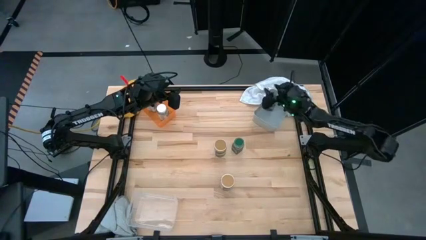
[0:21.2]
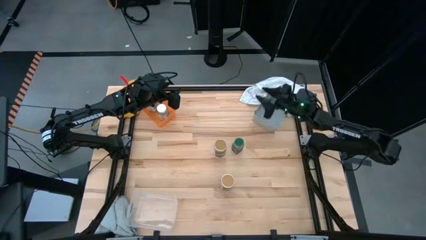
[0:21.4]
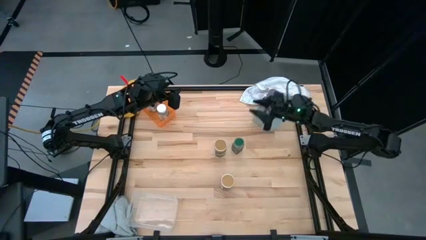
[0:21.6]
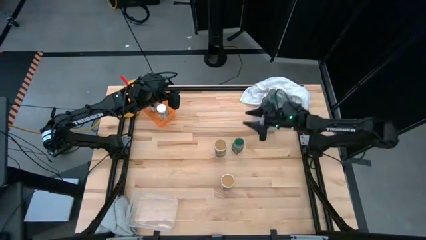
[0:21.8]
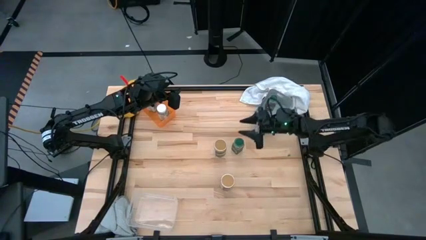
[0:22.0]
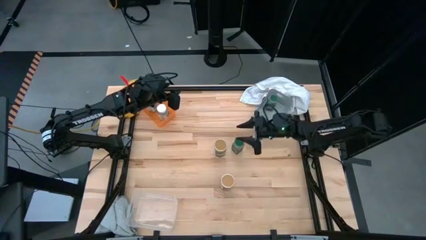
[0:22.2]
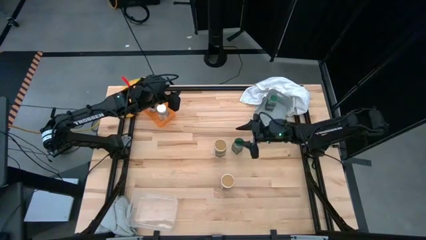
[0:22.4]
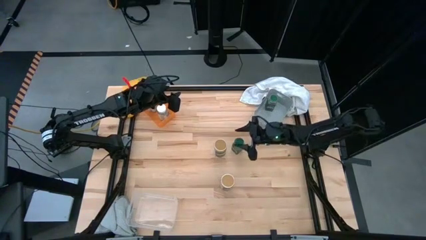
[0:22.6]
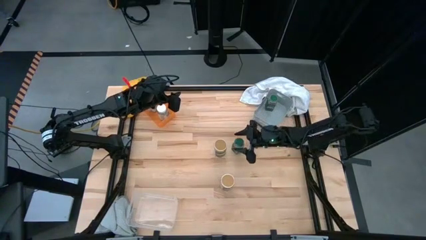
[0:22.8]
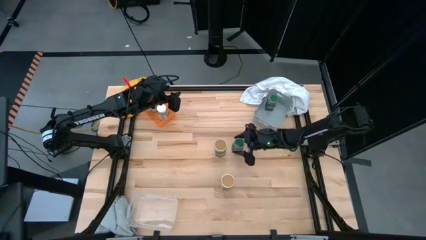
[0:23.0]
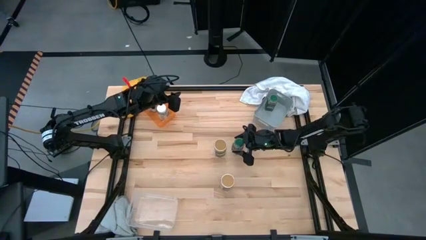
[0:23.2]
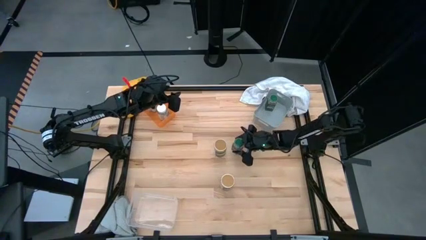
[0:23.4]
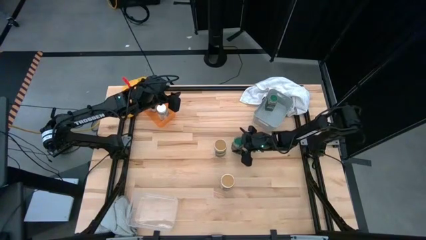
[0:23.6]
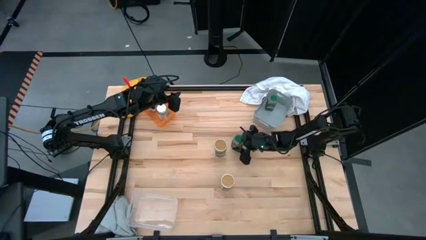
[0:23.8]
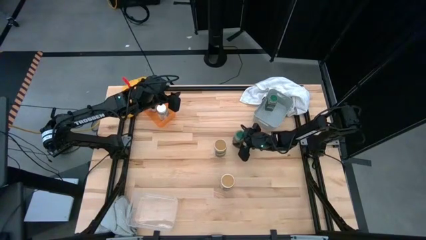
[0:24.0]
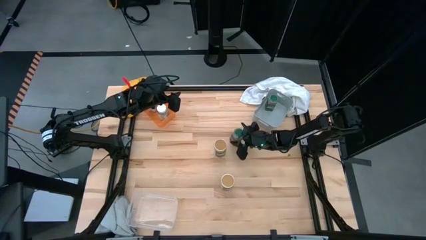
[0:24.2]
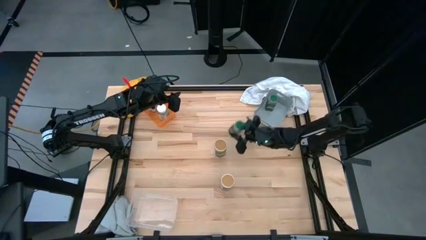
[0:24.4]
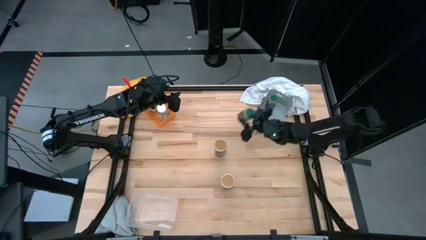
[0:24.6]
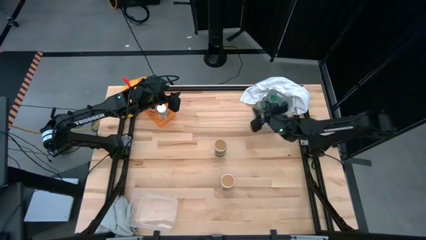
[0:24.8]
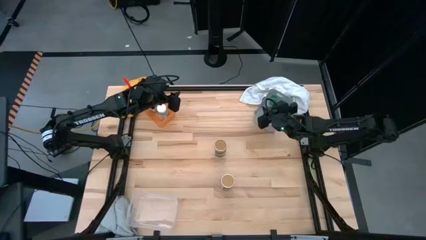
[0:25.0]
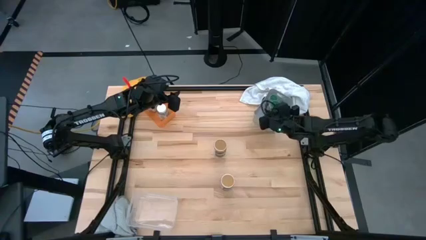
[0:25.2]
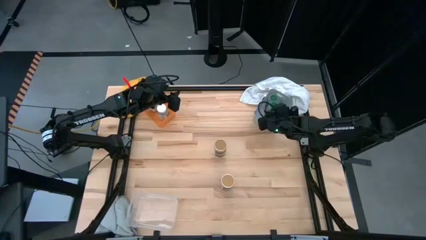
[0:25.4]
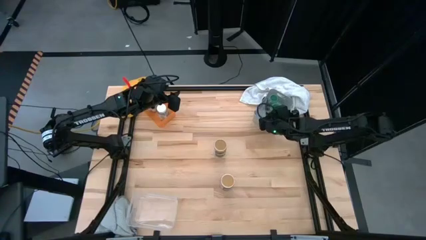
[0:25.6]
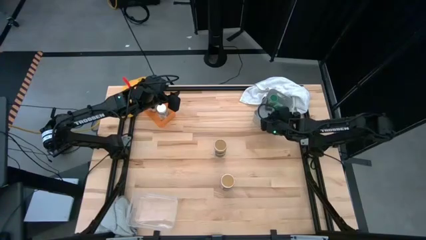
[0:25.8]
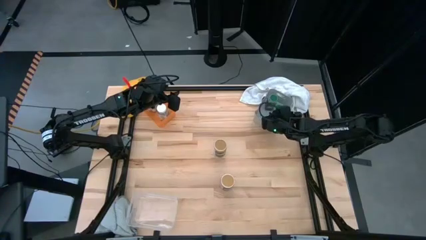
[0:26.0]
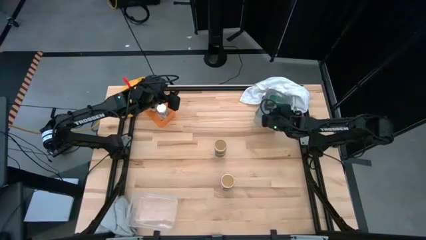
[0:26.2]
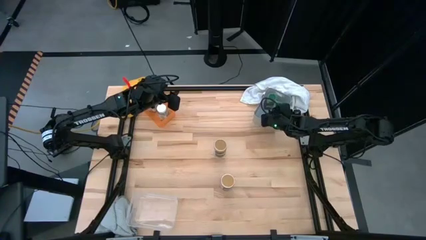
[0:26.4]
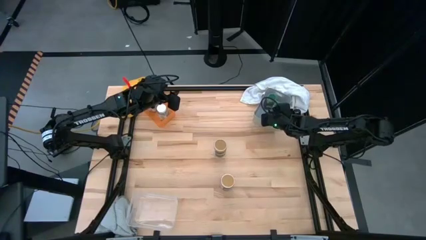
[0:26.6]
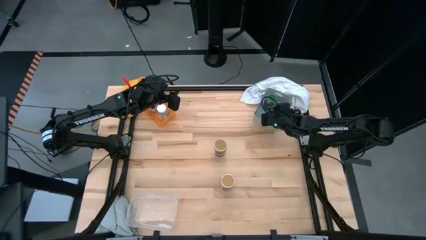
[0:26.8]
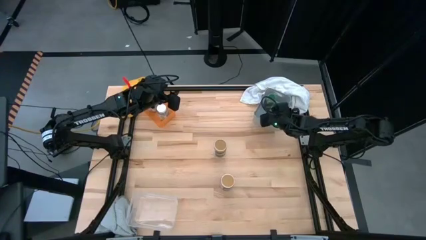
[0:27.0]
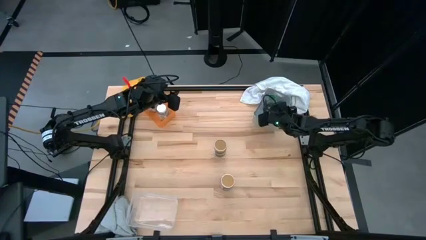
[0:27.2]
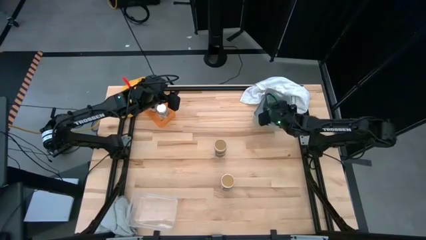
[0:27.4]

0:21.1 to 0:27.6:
Task: Sort spices by type
Put the green seasoning bottle into the gray bin

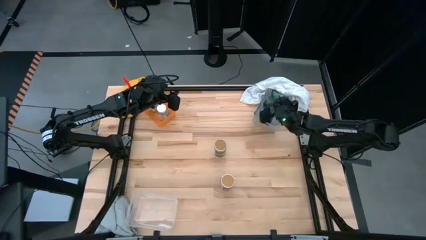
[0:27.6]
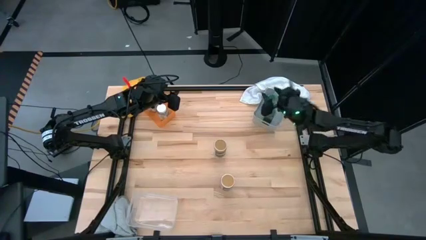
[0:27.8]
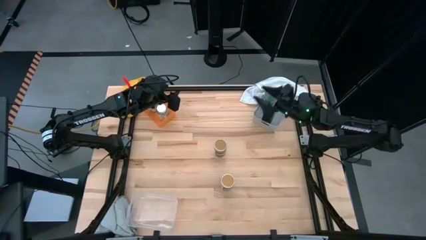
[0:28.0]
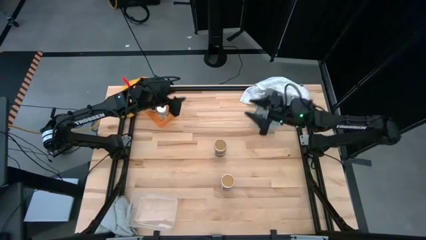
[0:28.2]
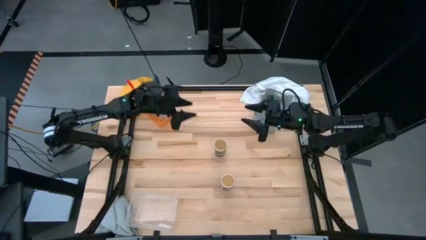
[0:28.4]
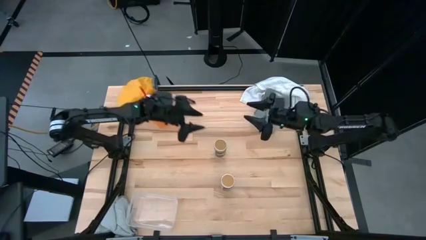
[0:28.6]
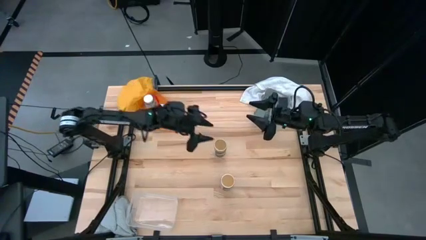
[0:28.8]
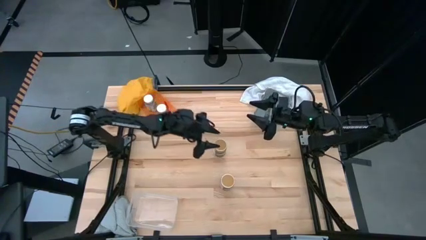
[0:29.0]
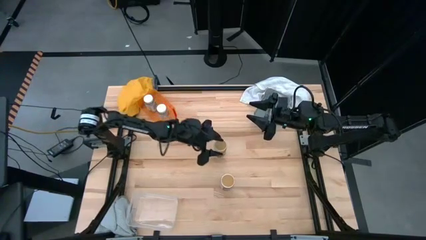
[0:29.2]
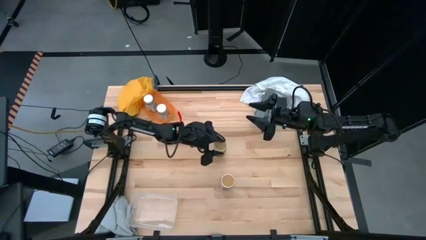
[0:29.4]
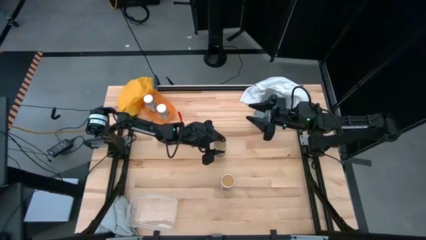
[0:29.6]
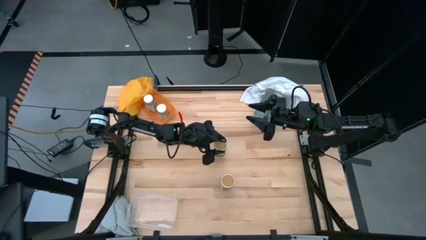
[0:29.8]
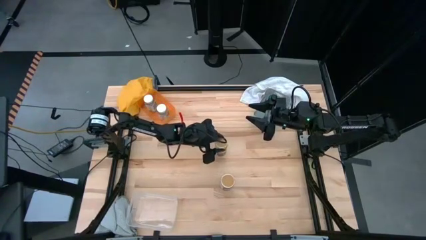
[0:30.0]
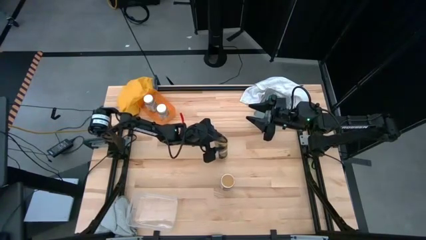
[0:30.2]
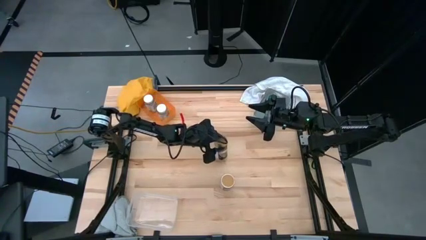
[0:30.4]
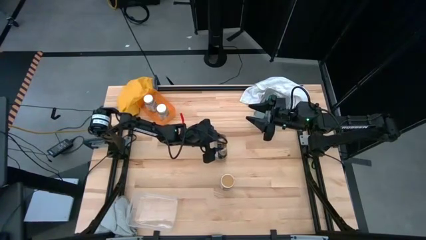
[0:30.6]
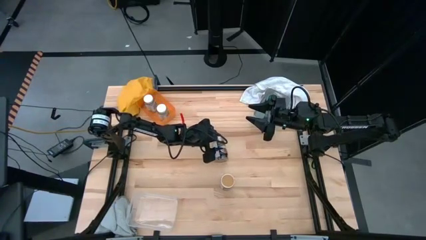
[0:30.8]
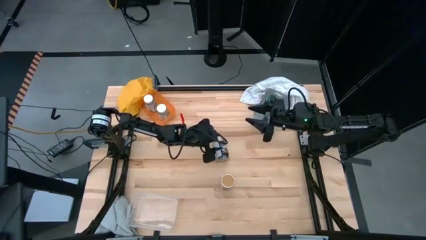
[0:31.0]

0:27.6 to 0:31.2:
Put the top gold seasoning bottle into the transparent bin

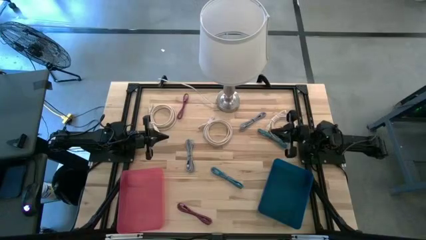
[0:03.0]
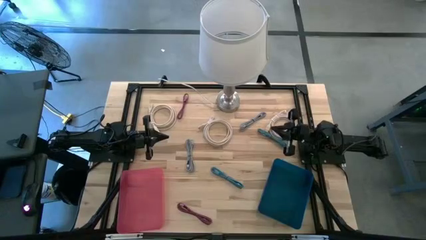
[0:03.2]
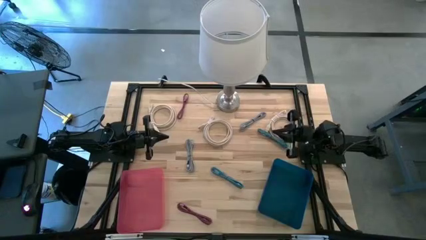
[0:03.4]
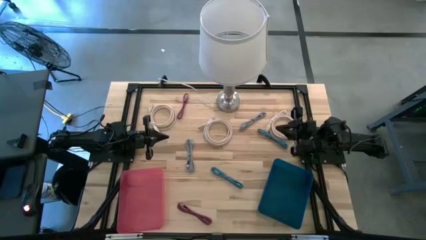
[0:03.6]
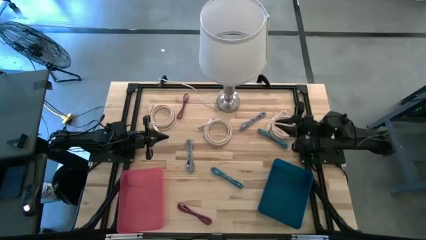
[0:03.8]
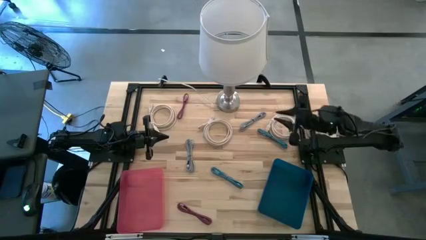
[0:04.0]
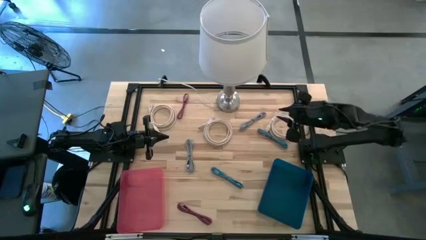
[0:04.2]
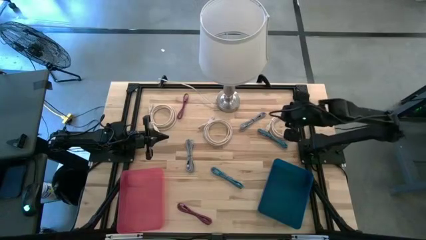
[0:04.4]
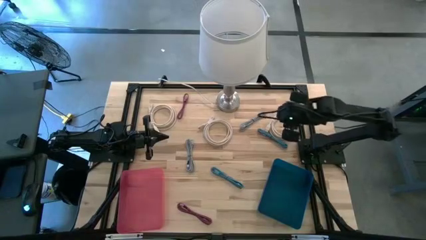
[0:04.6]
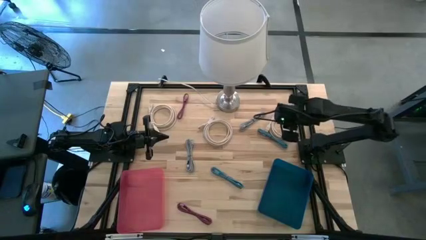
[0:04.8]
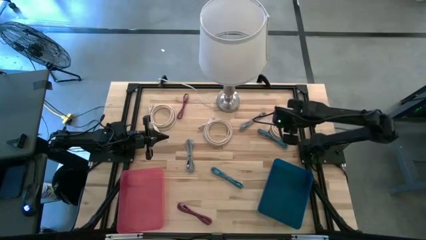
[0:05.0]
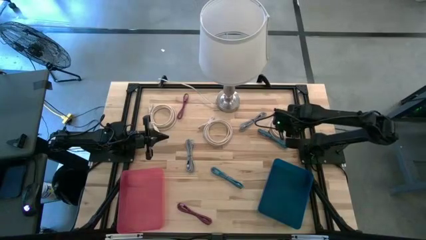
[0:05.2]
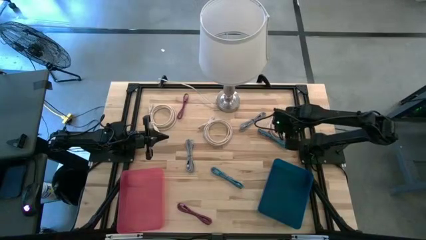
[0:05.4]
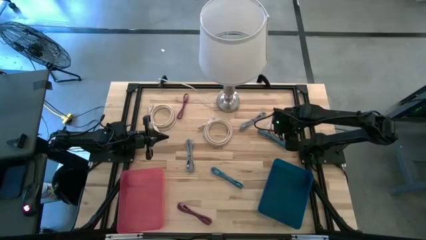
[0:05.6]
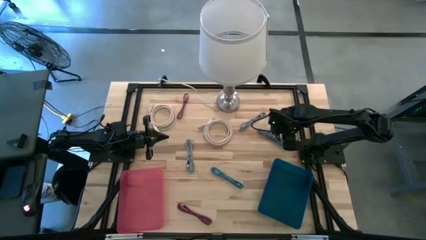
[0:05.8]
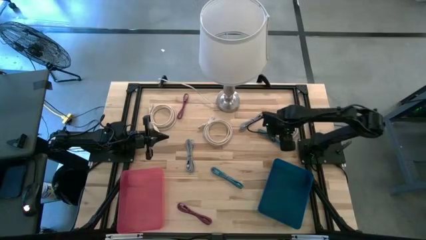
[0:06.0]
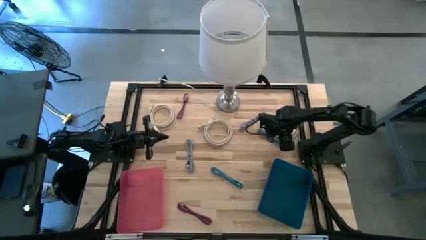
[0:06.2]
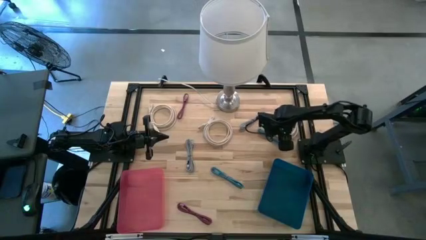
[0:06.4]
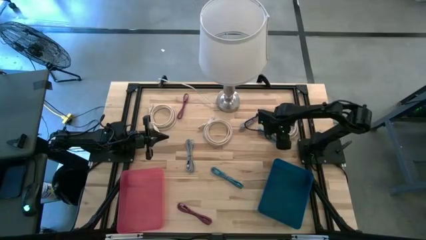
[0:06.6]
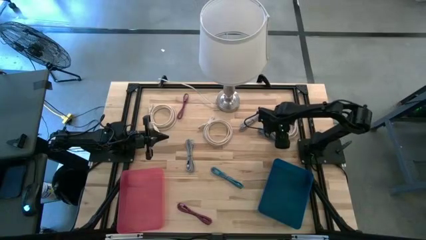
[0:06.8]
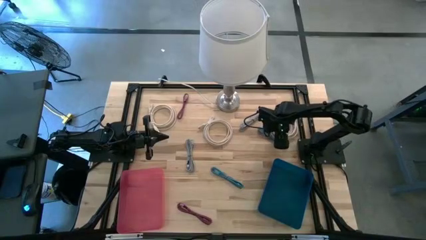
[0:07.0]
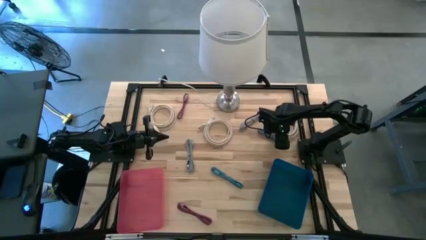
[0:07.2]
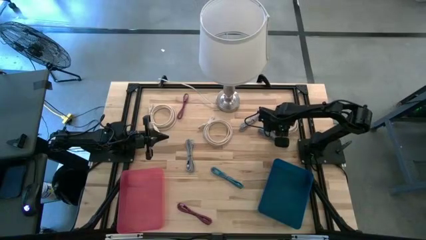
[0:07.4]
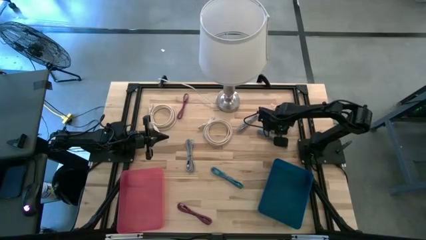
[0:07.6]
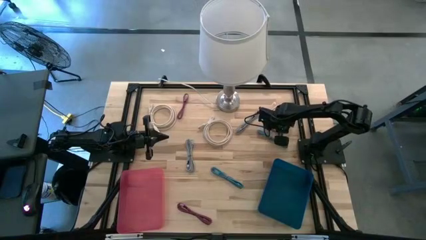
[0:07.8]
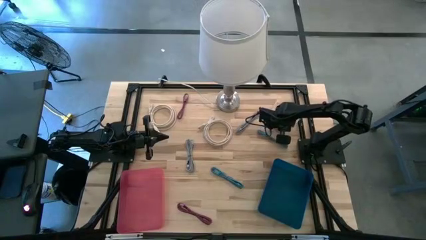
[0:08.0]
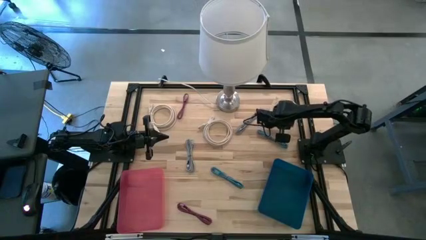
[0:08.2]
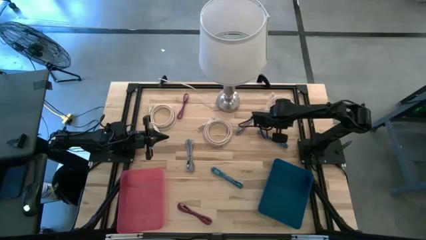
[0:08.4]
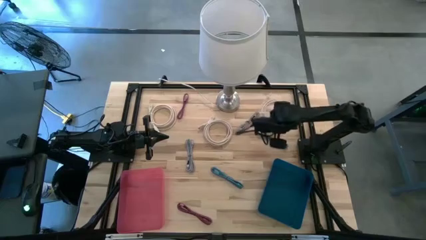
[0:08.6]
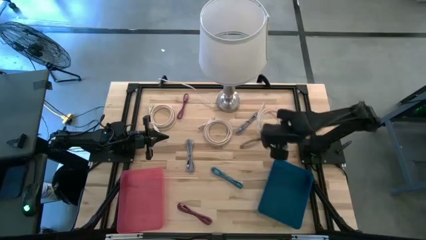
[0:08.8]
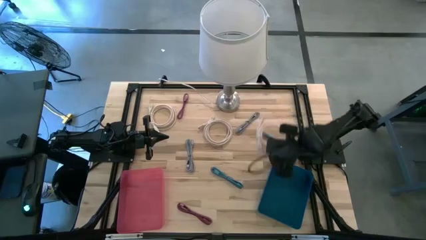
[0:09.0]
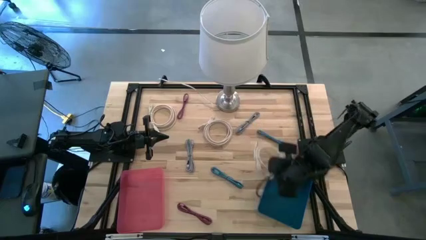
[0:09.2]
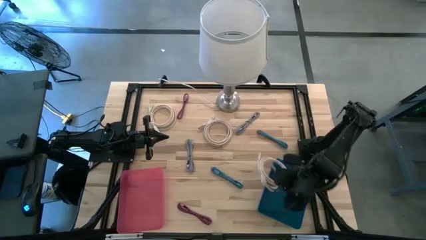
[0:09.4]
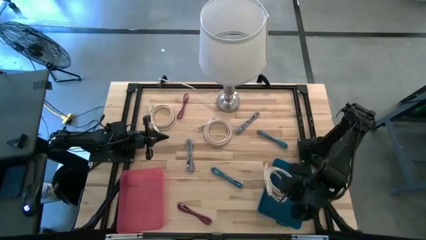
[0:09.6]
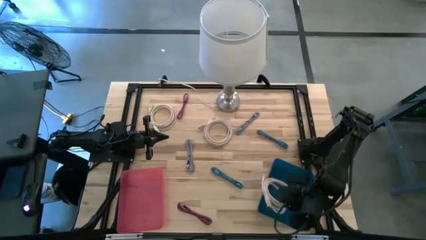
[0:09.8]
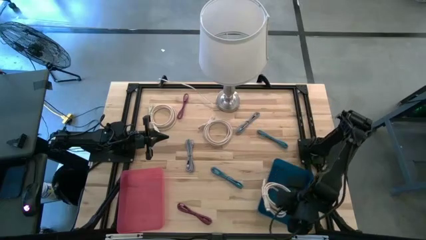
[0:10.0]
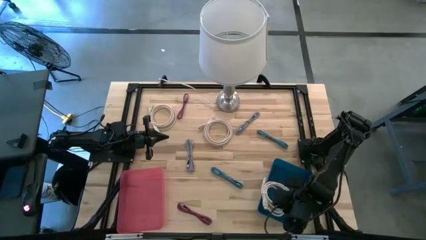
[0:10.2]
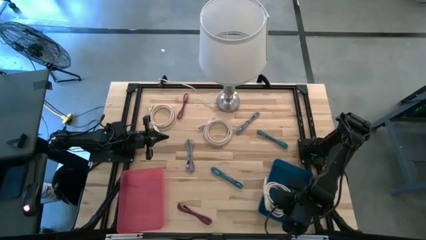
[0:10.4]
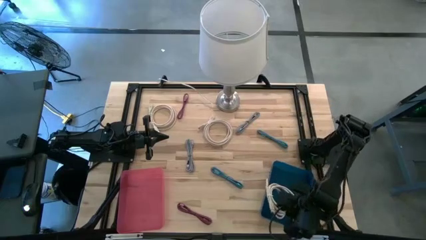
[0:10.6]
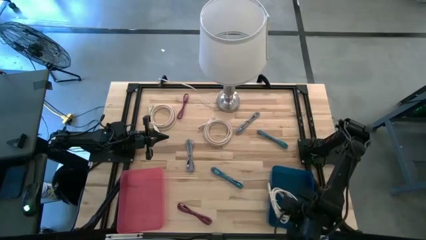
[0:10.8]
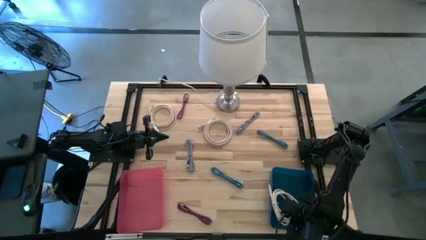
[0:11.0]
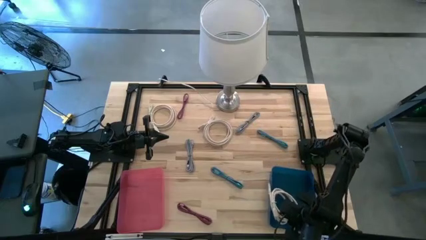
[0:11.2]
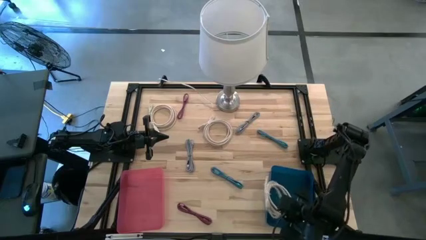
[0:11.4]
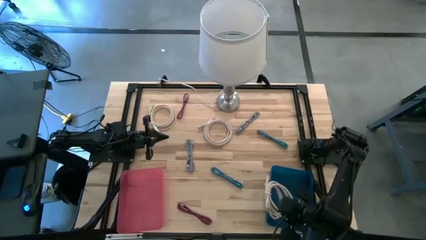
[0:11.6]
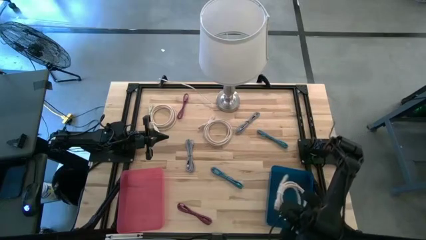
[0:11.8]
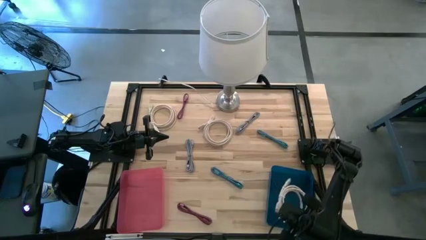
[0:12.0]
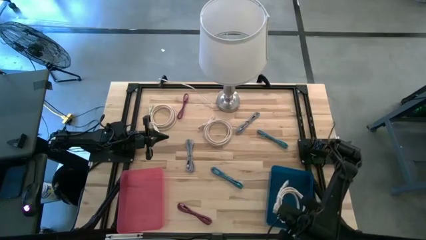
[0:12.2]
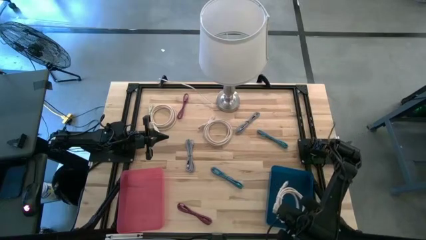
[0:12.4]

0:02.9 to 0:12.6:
Task: Pick & Place USB Port
Put the right light brown USB cable into the blue bin
